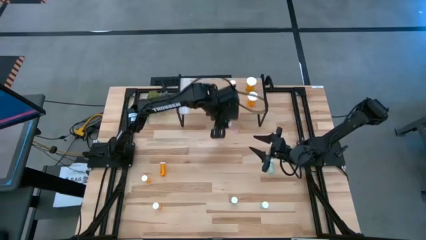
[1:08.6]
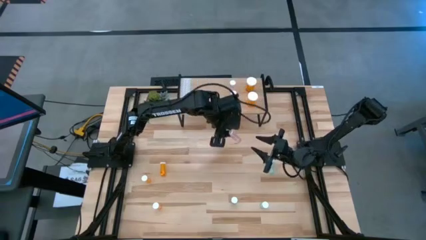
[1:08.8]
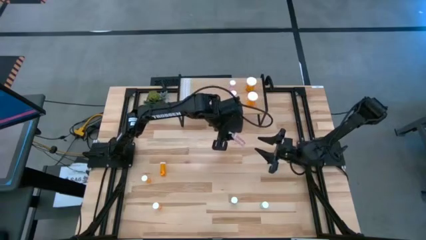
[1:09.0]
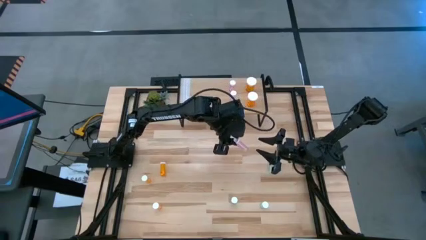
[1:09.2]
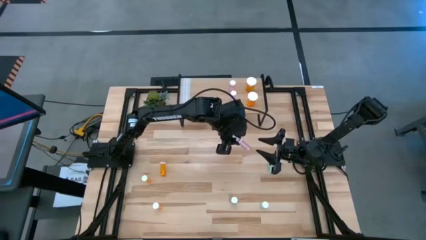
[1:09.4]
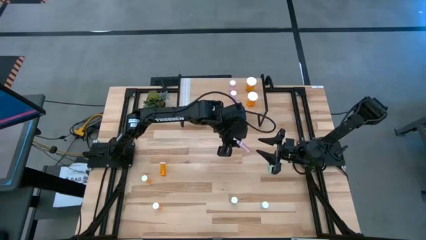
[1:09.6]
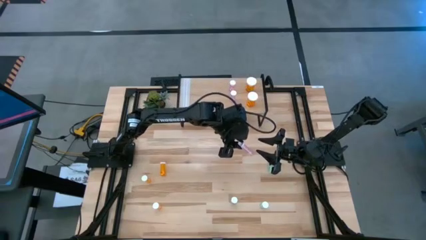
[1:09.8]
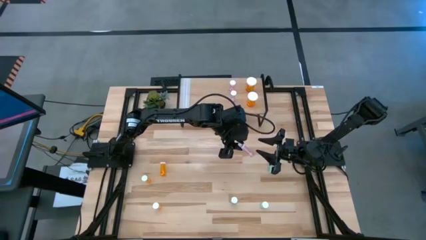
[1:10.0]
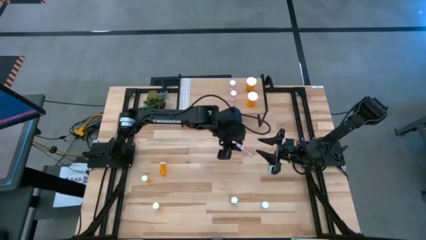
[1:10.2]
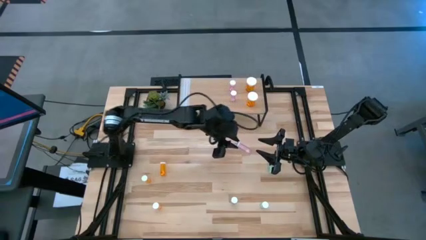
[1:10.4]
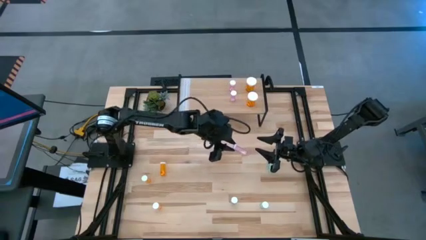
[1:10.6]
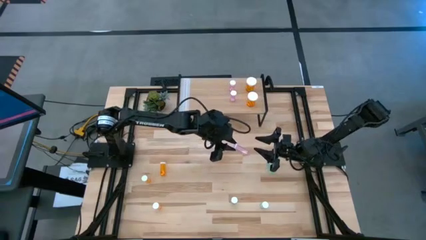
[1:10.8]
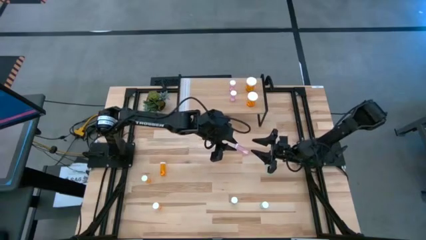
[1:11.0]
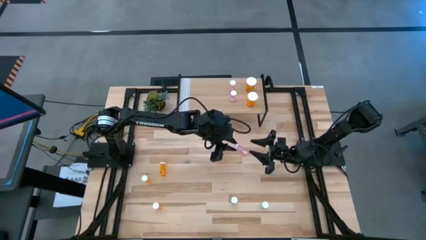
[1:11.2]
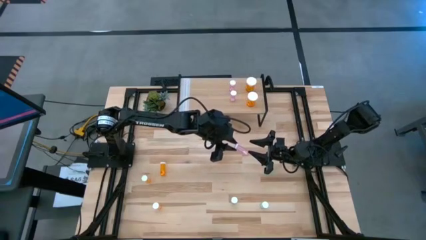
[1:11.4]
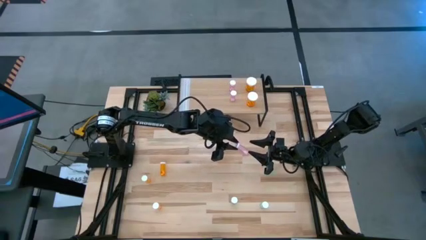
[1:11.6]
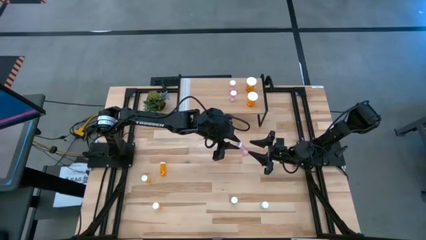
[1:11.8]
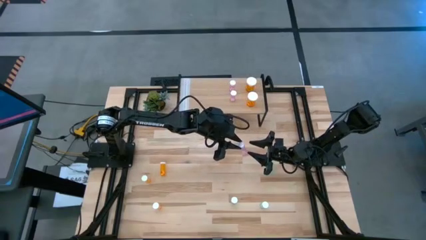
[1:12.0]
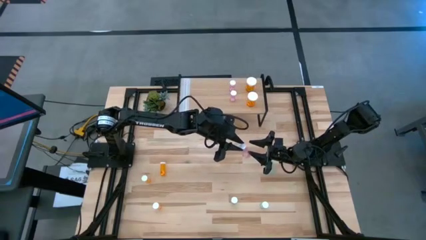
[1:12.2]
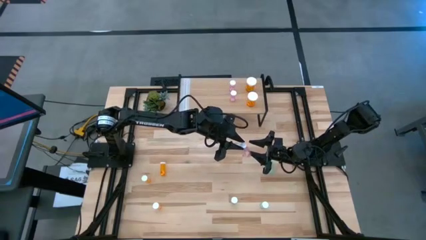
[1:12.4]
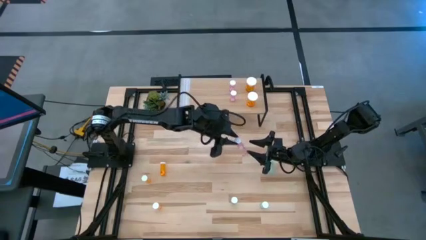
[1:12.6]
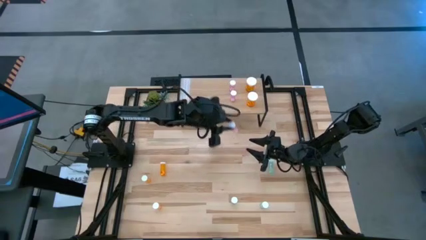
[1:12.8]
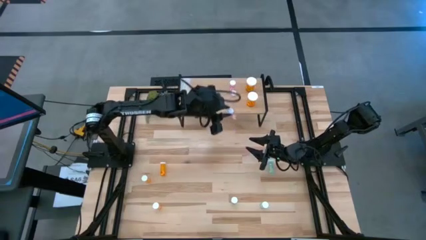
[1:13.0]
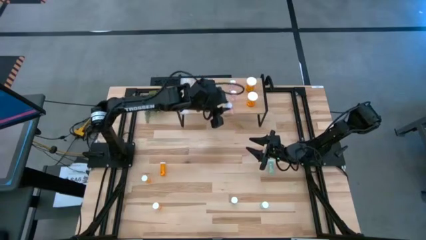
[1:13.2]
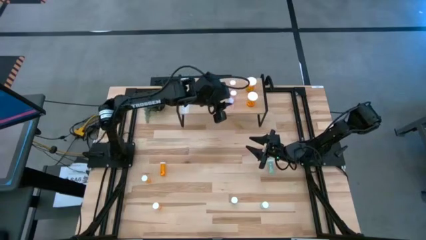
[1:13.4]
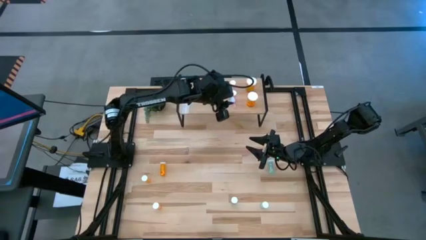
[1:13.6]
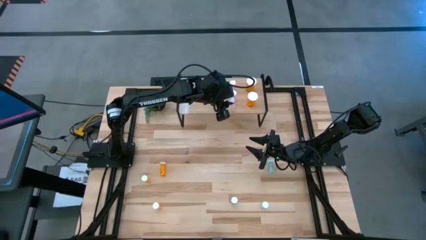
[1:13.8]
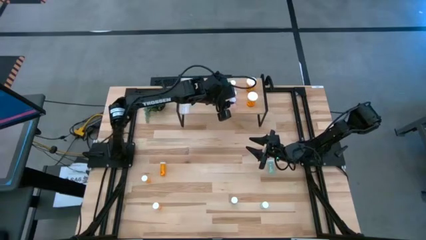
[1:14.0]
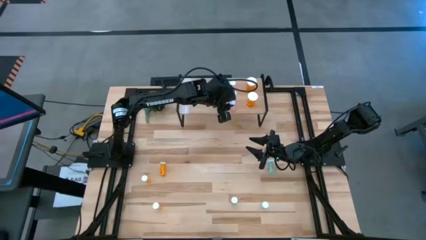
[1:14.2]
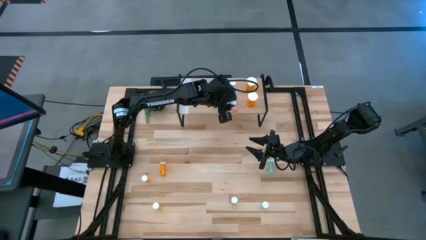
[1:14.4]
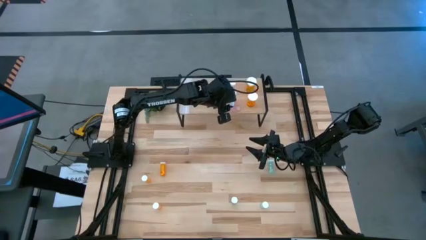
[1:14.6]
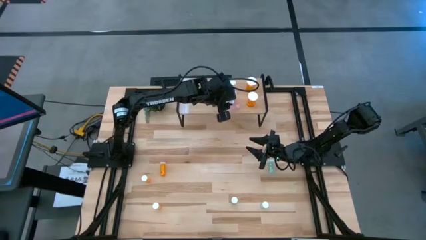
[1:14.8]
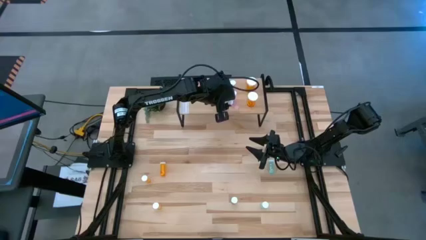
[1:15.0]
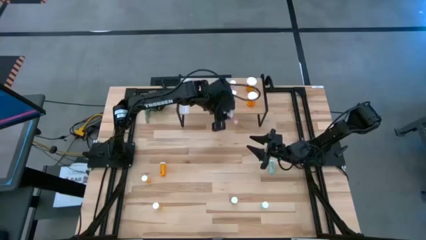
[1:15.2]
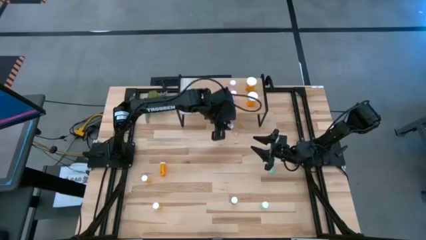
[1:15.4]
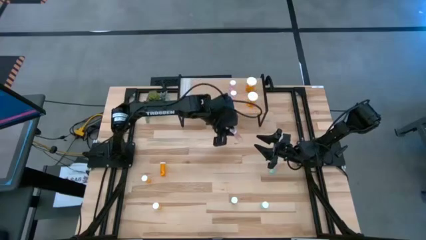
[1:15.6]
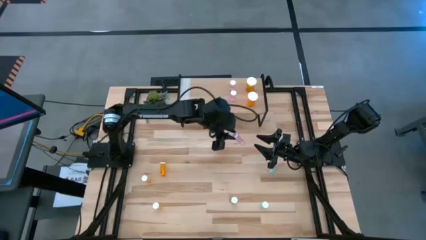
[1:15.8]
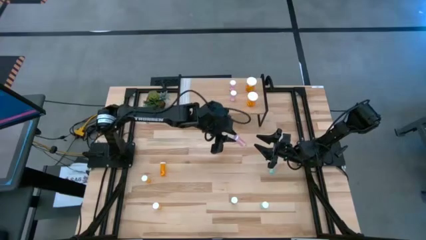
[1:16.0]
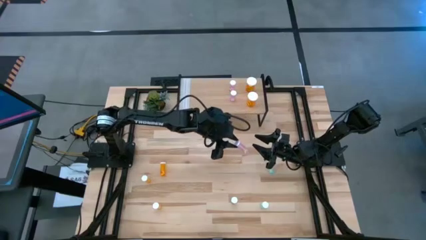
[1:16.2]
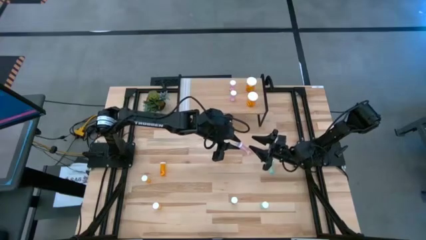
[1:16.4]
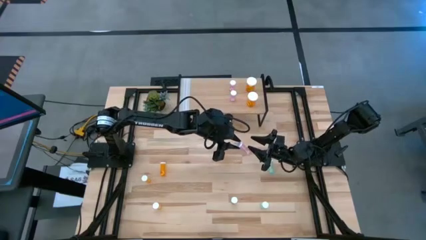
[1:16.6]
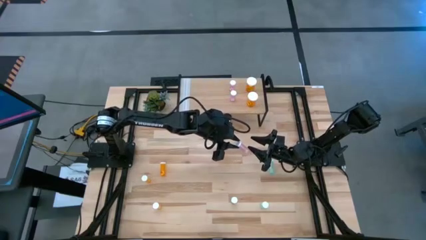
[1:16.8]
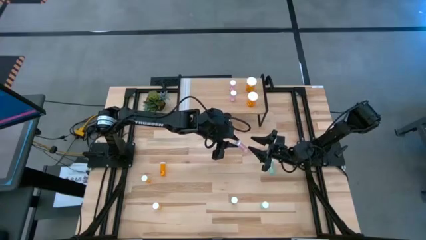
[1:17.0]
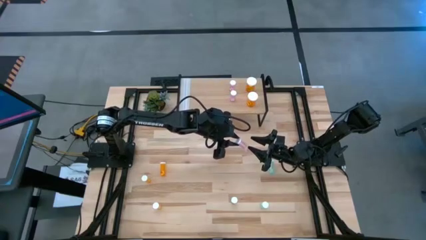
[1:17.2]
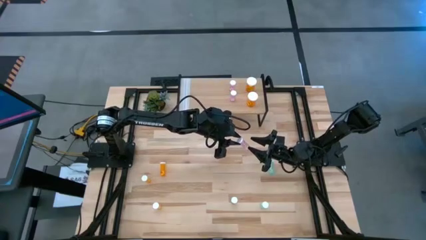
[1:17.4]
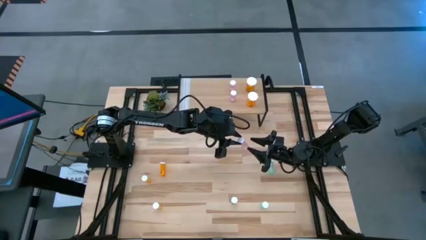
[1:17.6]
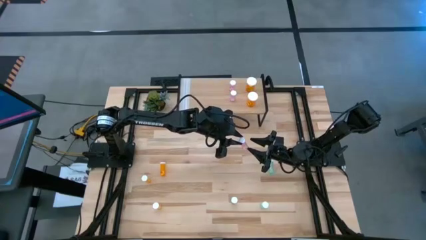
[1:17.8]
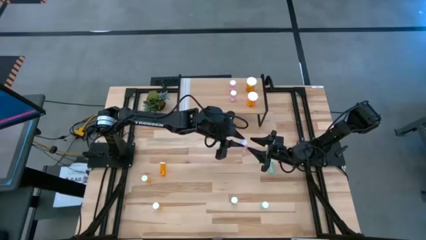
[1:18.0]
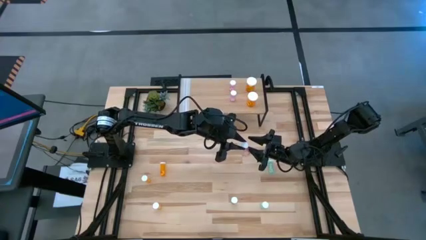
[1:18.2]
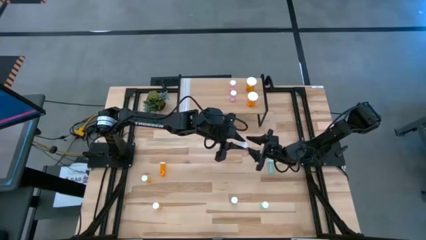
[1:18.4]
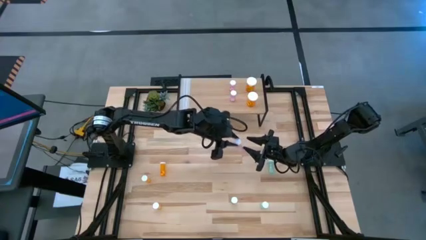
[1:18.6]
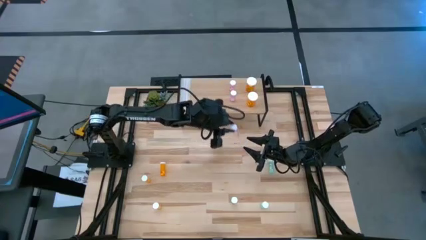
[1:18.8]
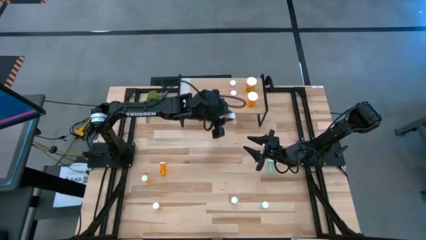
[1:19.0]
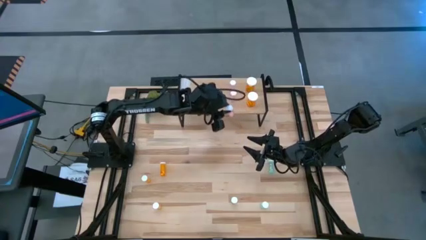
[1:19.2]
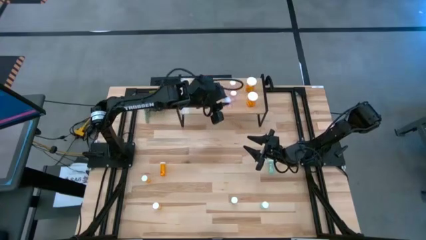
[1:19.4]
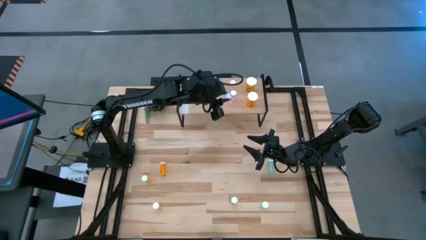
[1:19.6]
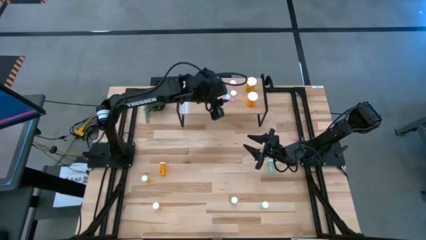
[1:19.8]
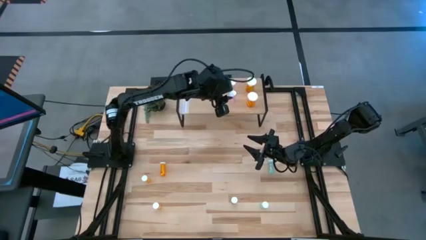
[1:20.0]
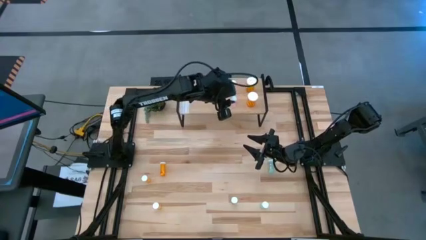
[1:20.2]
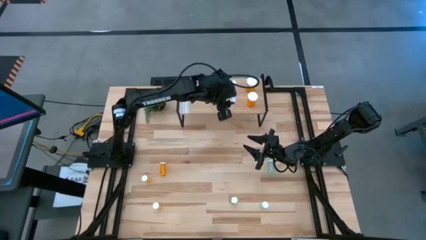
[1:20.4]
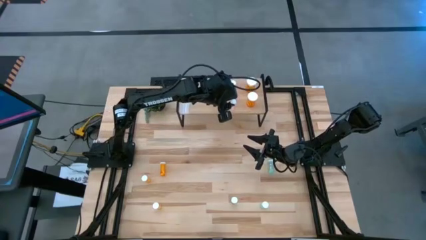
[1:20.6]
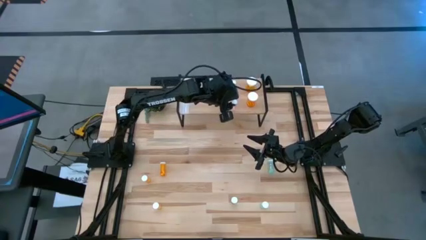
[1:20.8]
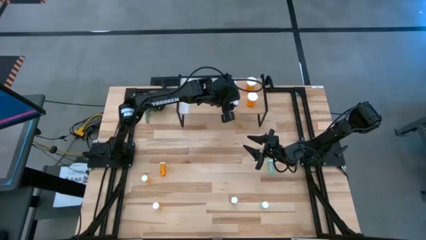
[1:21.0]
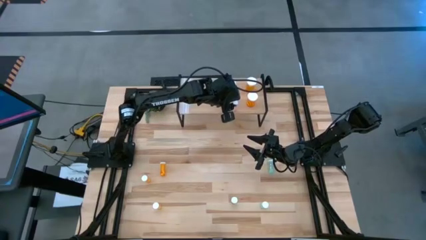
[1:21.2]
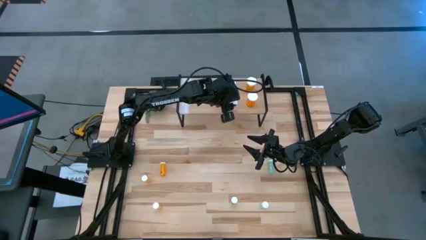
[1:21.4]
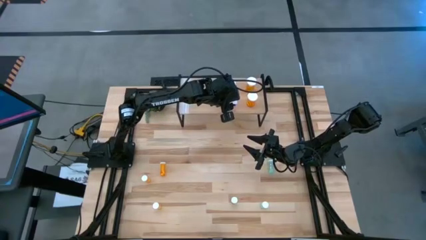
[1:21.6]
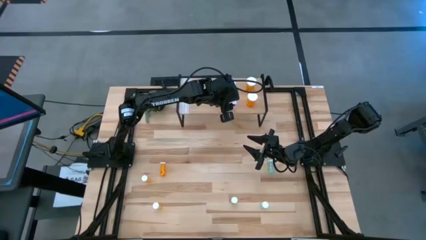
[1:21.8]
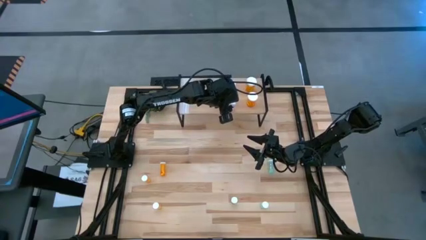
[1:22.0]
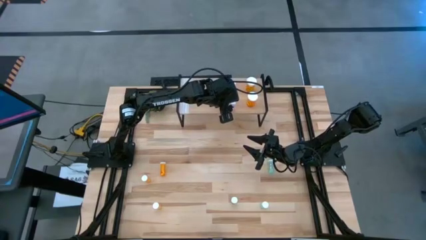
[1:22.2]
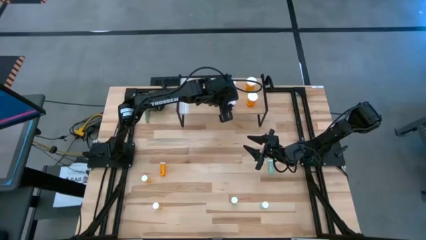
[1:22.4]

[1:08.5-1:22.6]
Task: Pick and place medicine bottles onto shelf by color
Put the pink pill bottle on the shelf aligned with the other pink pill bottles
